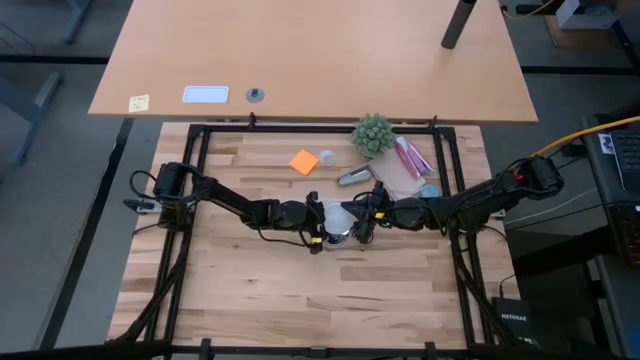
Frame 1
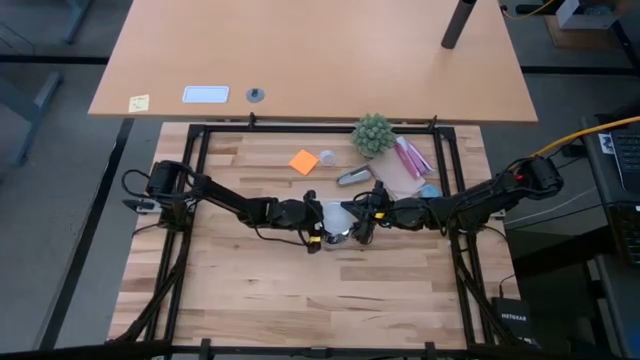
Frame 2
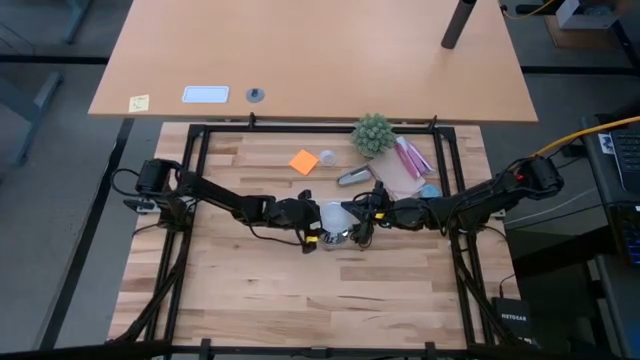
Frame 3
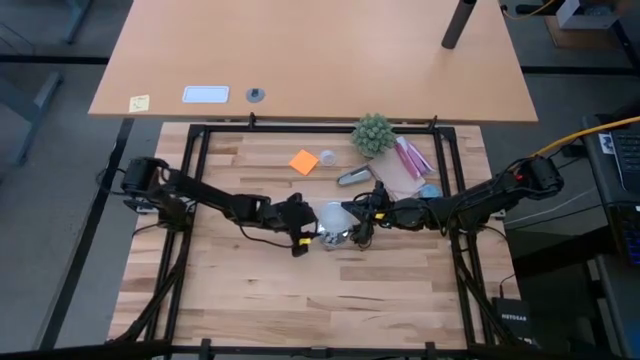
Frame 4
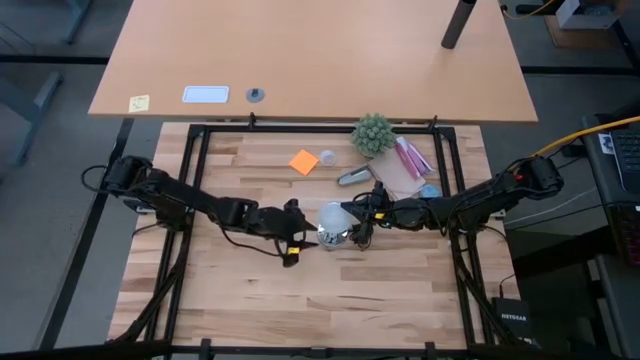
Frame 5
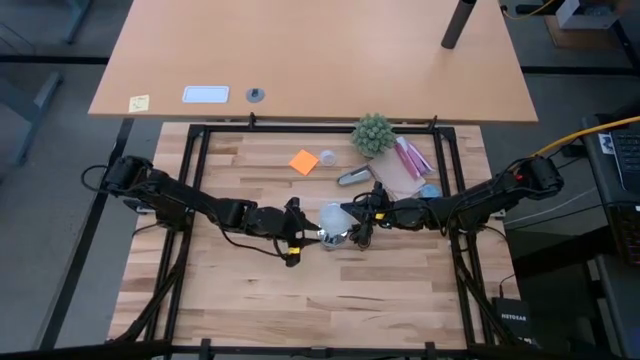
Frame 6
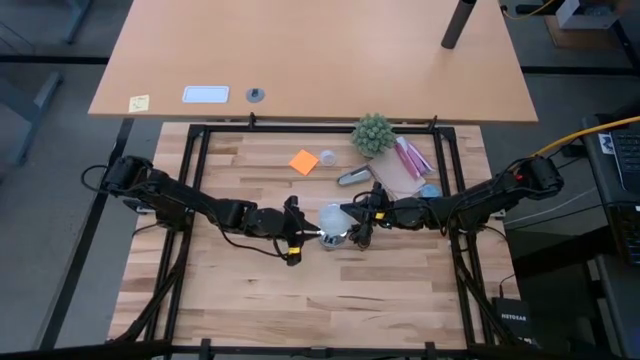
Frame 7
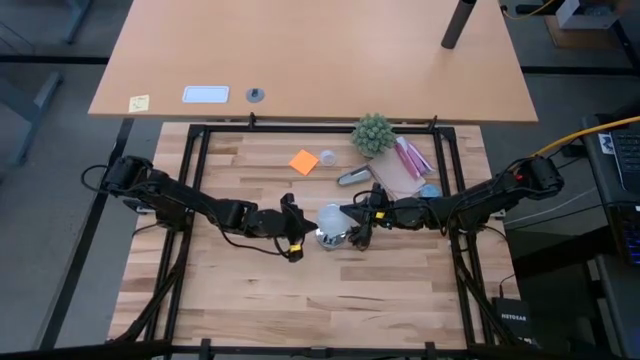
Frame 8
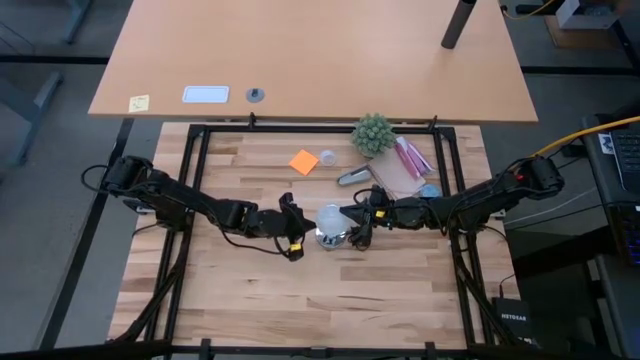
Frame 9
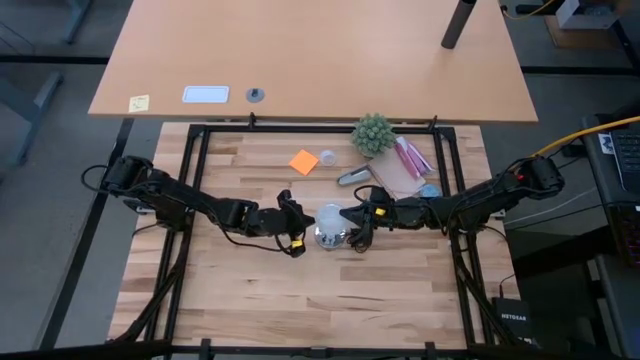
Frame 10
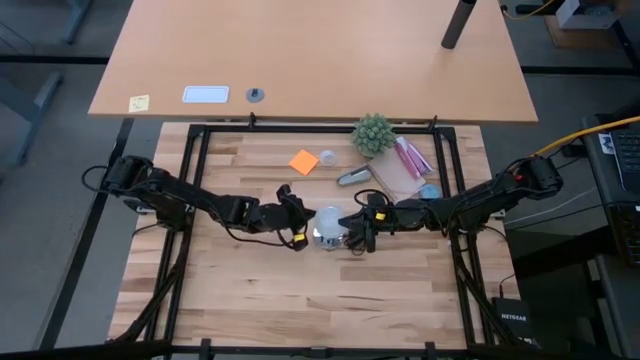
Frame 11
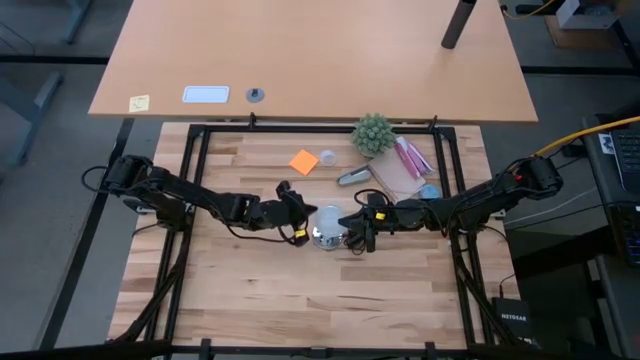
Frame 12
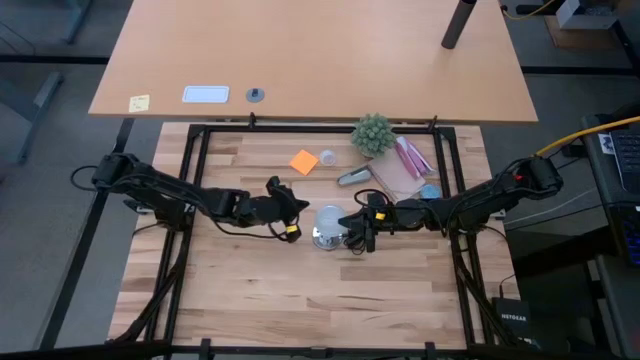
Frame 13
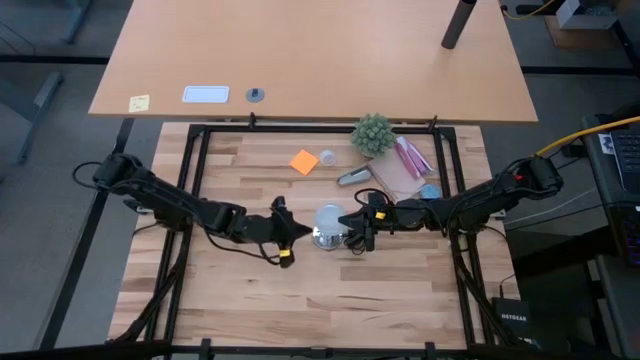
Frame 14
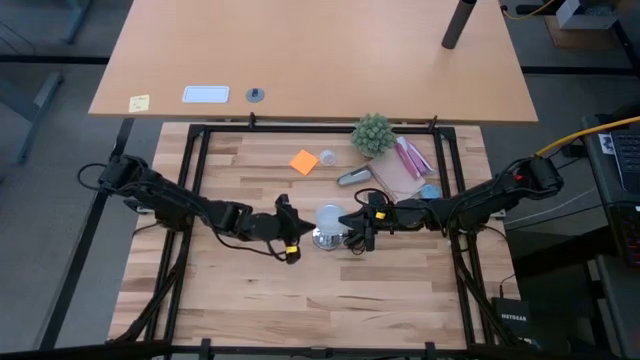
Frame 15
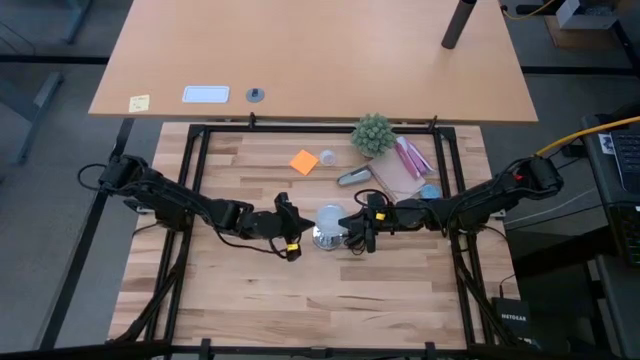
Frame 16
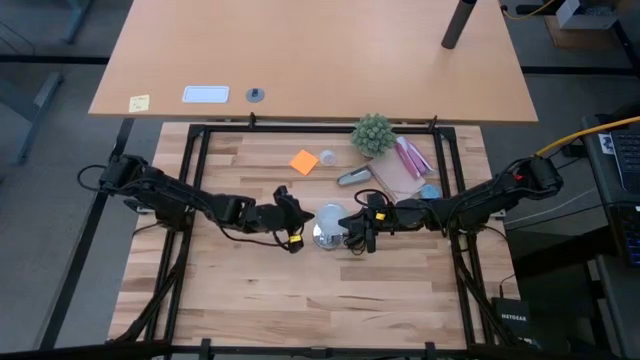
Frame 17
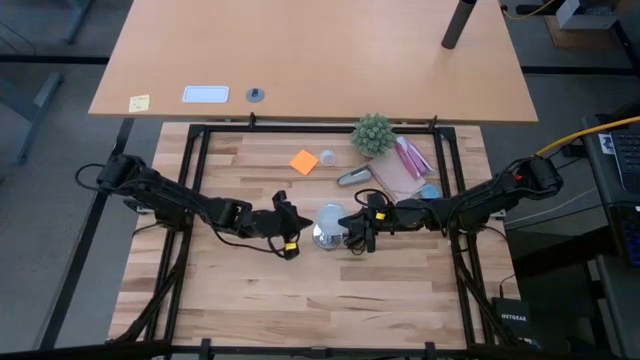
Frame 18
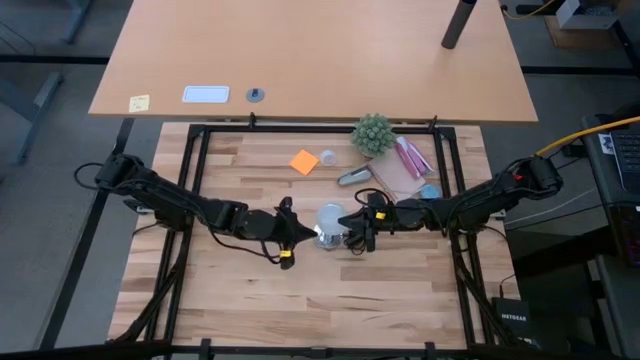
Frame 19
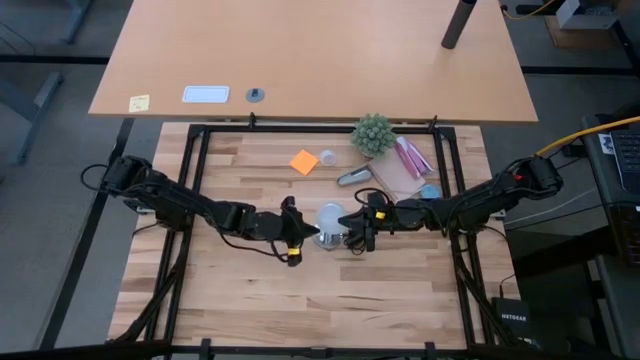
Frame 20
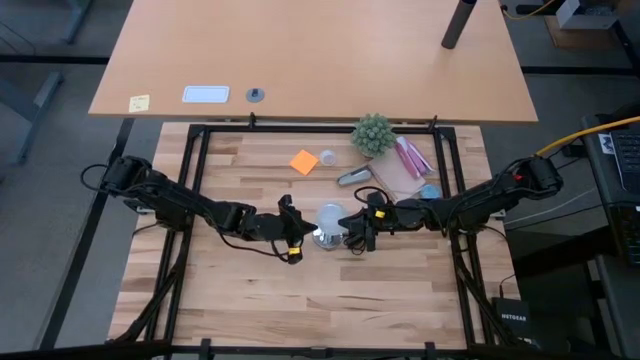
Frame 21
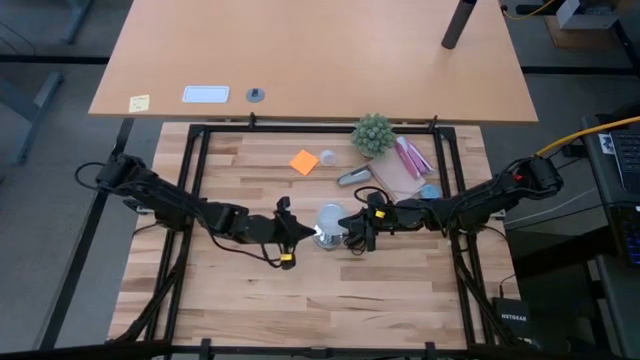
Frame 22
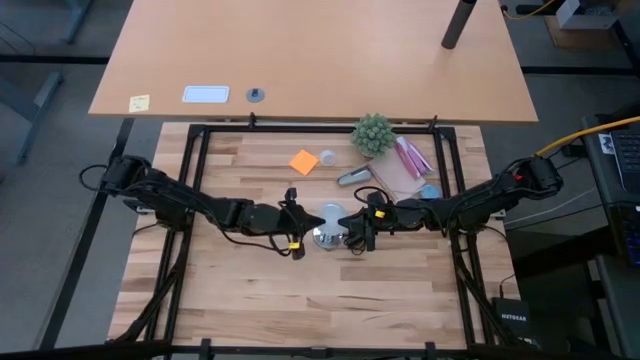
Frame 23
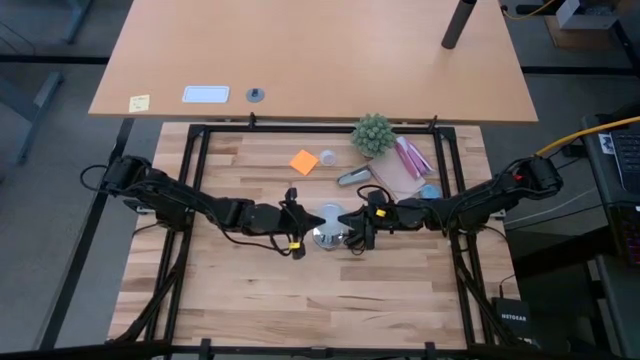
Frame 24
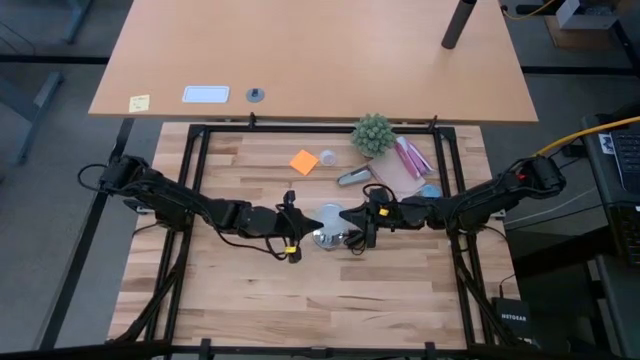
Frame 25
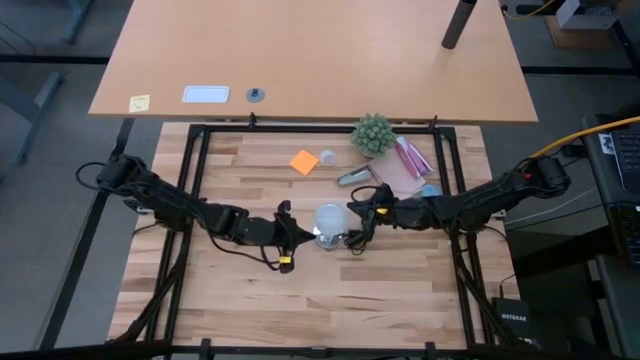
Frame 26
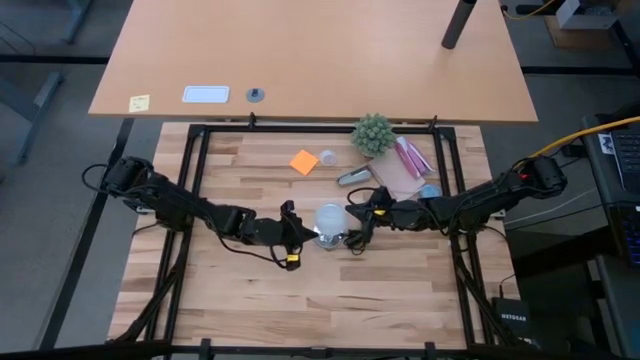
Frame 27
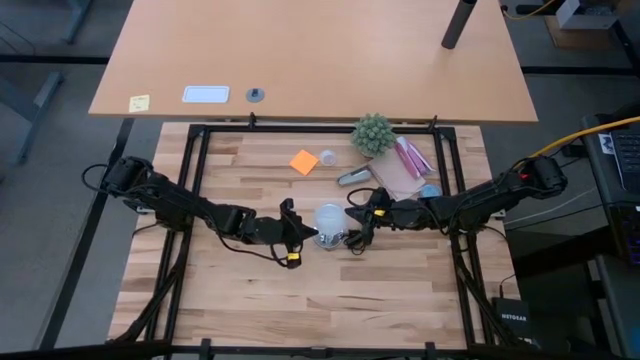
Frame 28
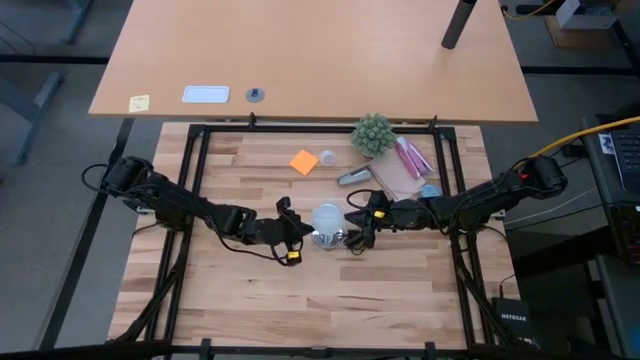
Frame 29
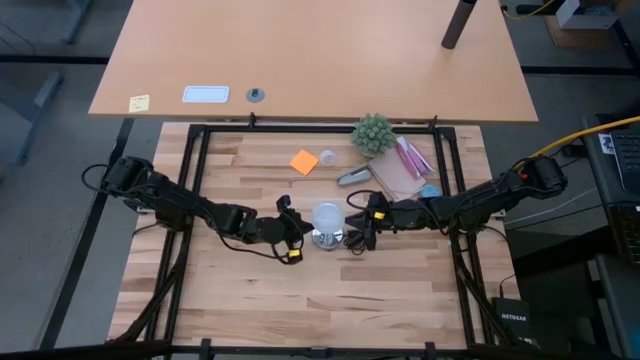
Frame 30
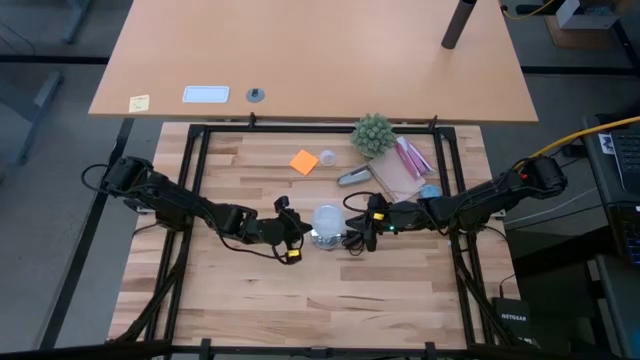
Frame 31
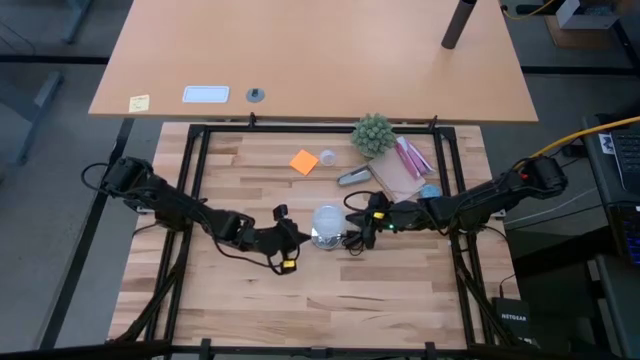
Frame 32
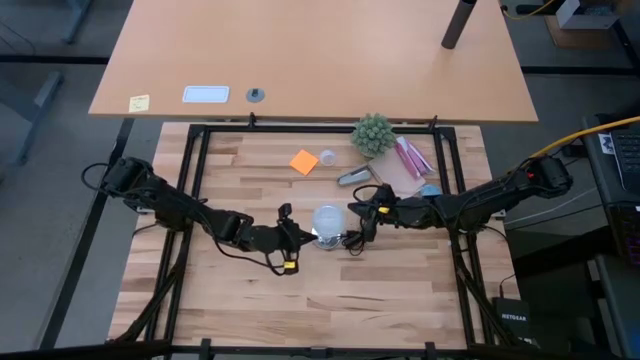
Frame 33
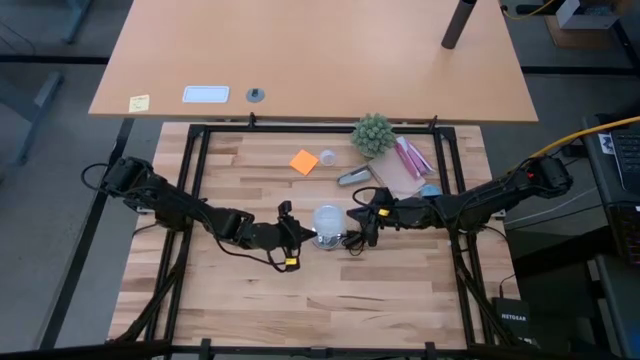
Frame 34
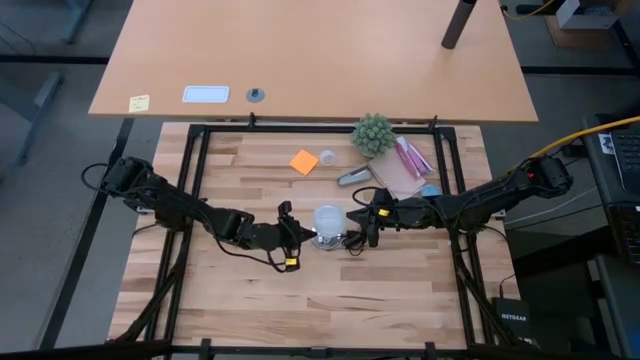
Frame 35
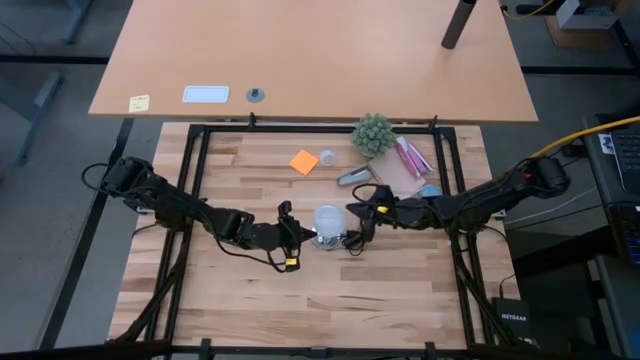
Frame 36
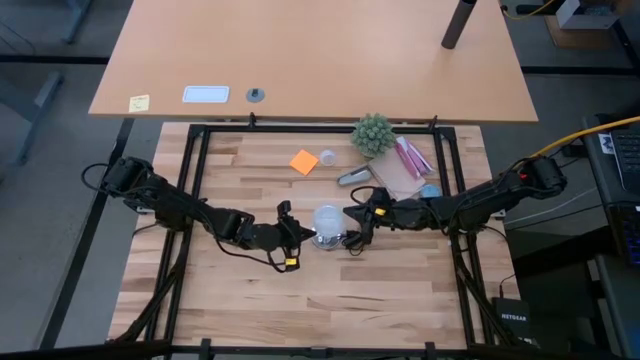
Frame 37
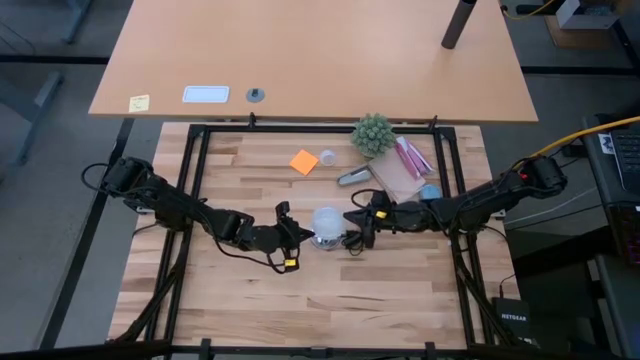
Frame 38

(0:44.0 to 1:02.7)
Task: Screw lightbulb
Insert the lightbulb in the silver lamp
